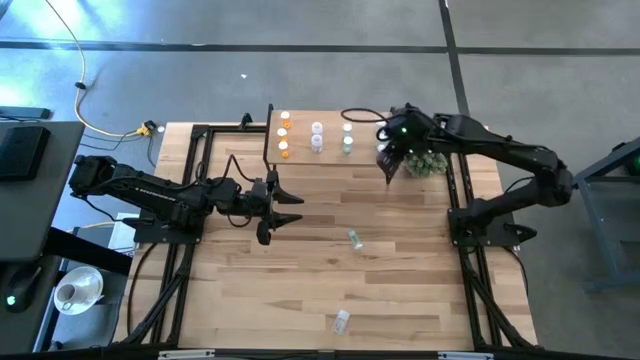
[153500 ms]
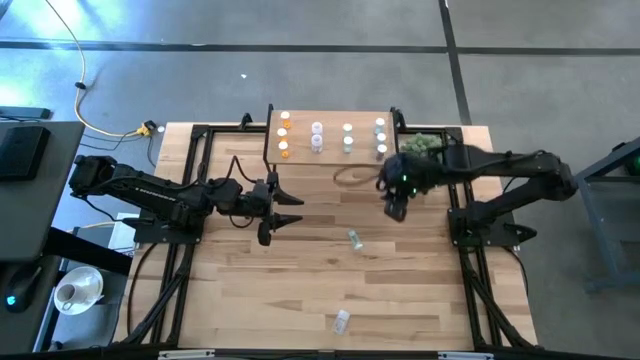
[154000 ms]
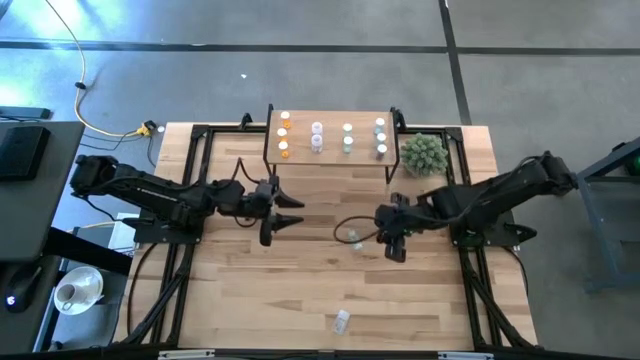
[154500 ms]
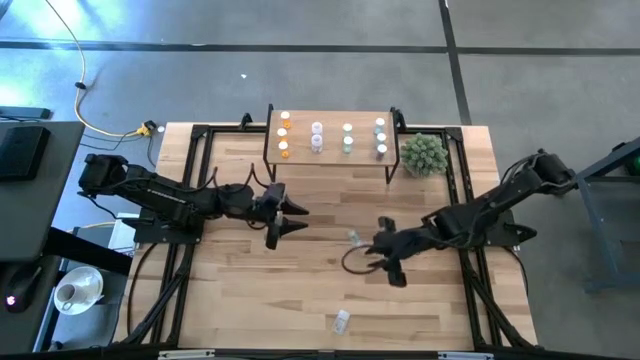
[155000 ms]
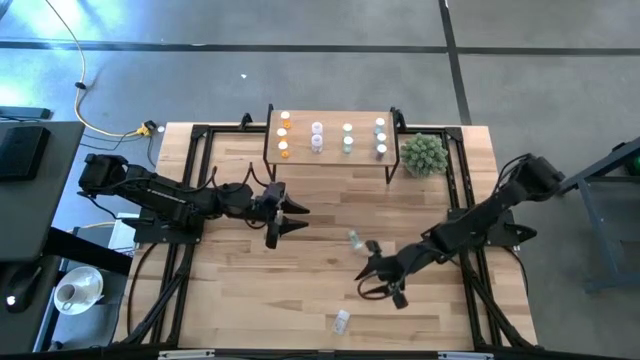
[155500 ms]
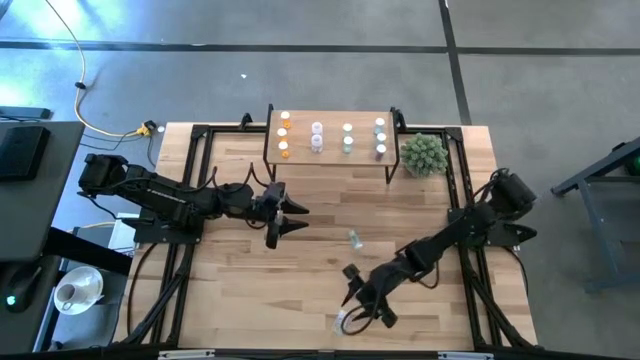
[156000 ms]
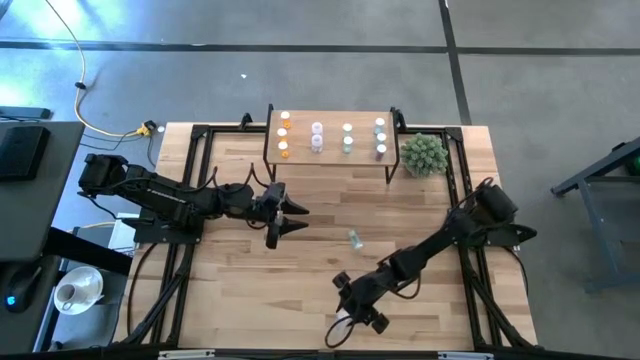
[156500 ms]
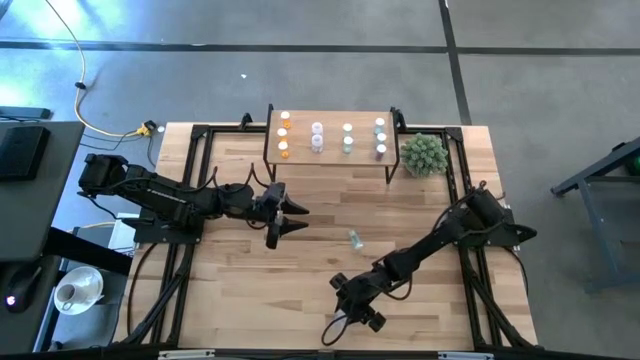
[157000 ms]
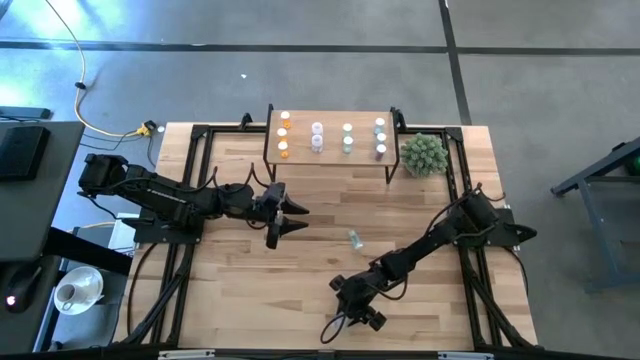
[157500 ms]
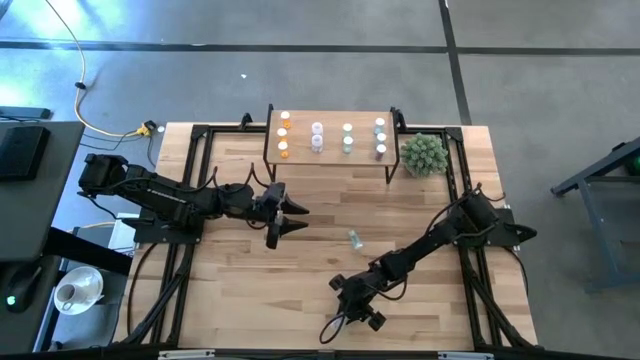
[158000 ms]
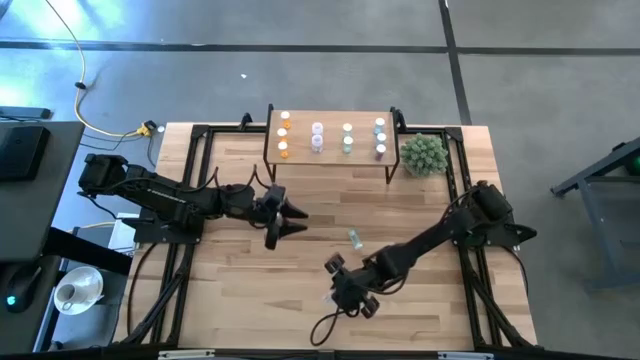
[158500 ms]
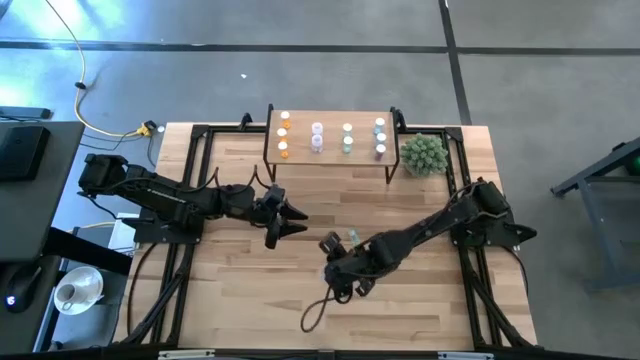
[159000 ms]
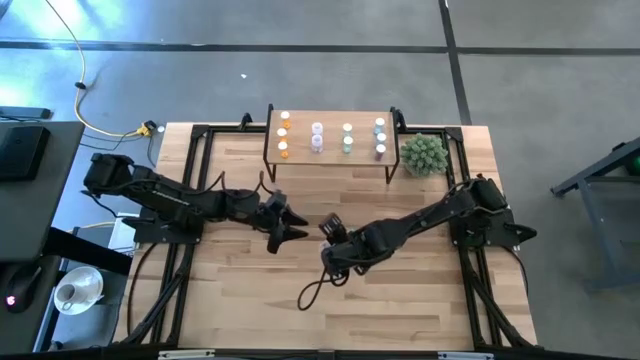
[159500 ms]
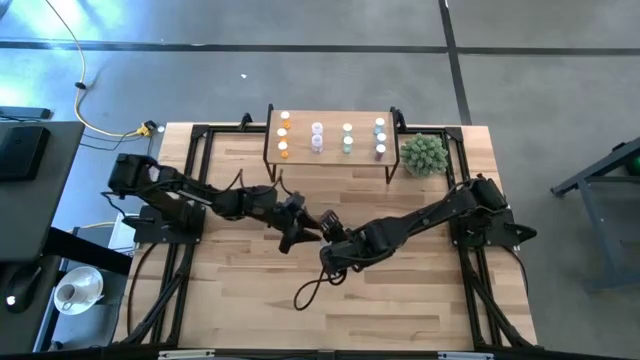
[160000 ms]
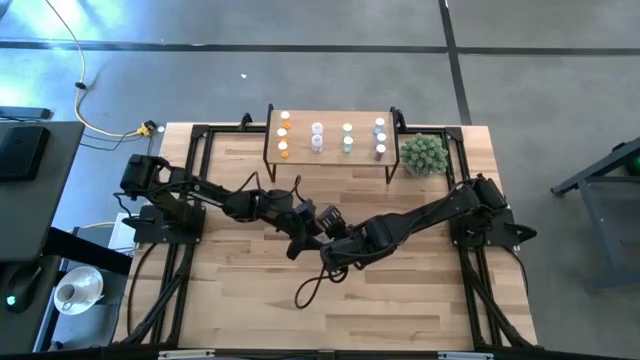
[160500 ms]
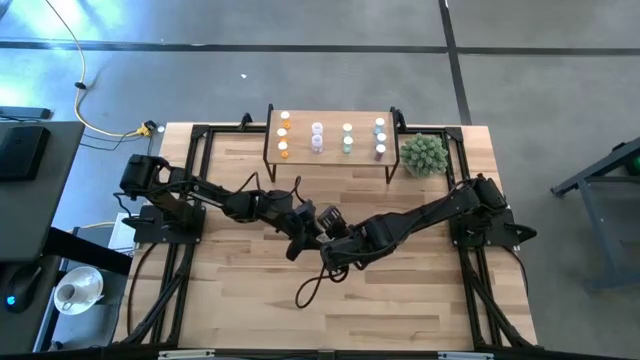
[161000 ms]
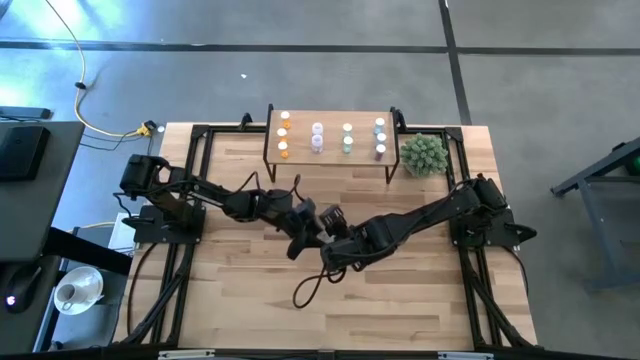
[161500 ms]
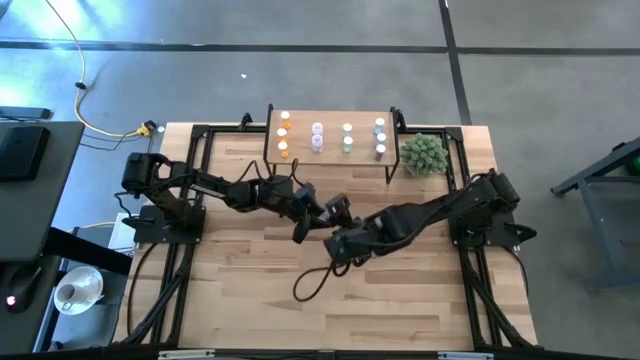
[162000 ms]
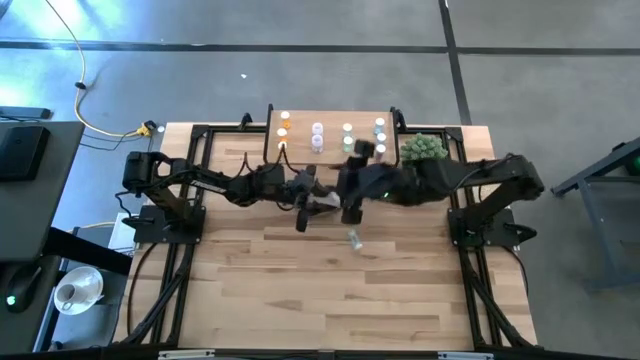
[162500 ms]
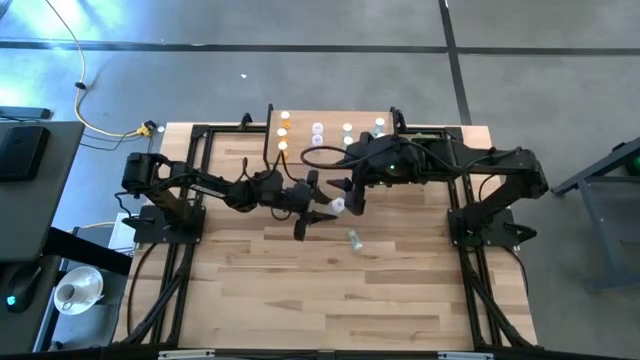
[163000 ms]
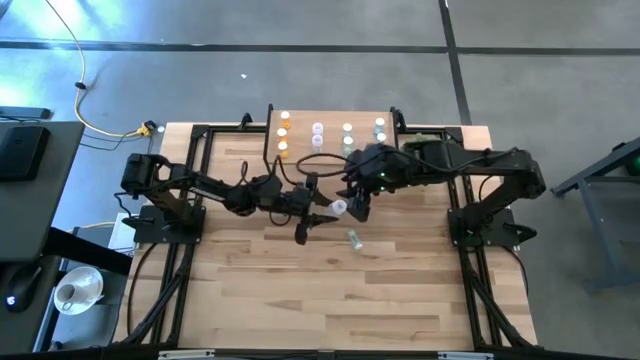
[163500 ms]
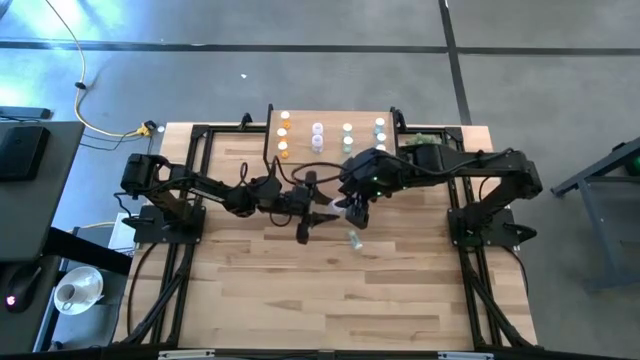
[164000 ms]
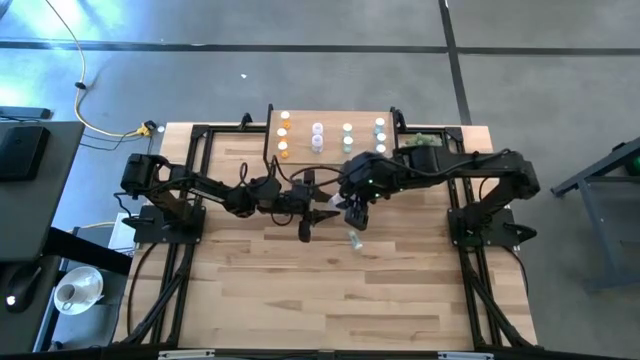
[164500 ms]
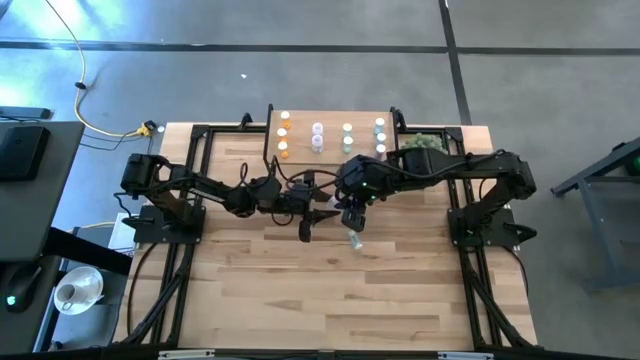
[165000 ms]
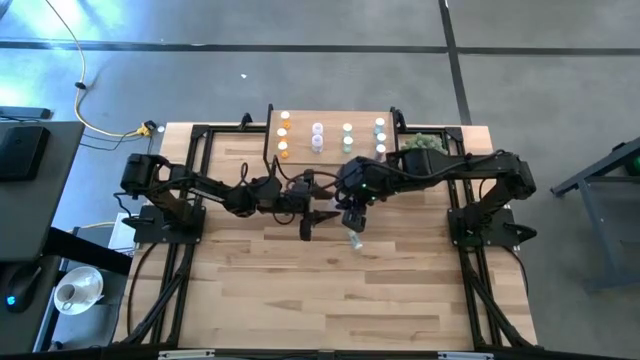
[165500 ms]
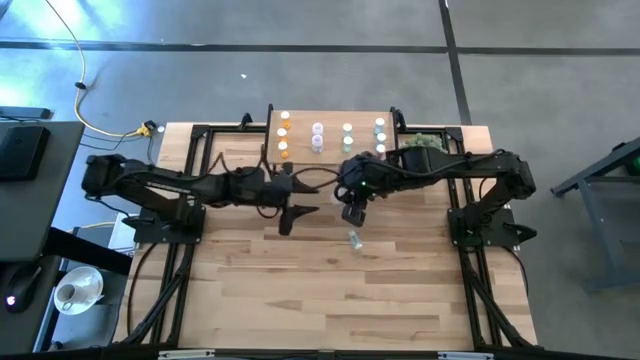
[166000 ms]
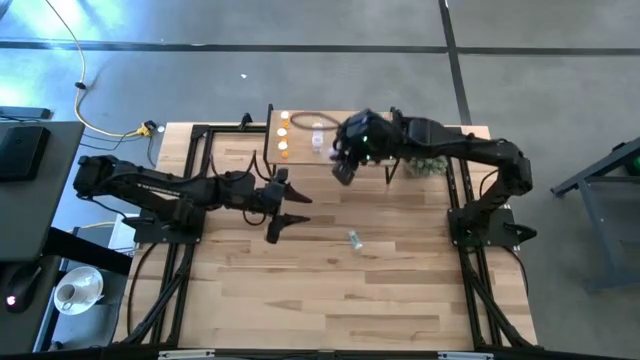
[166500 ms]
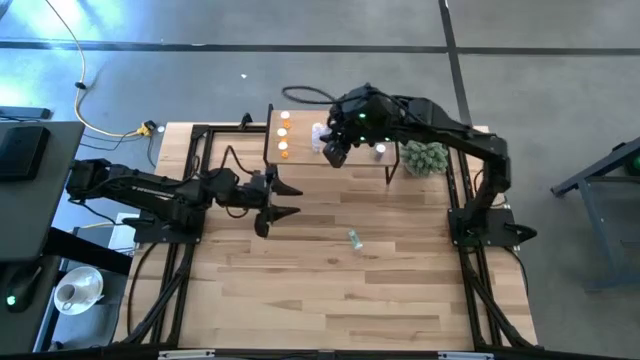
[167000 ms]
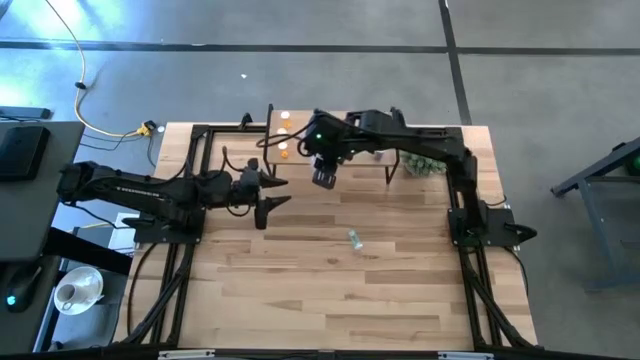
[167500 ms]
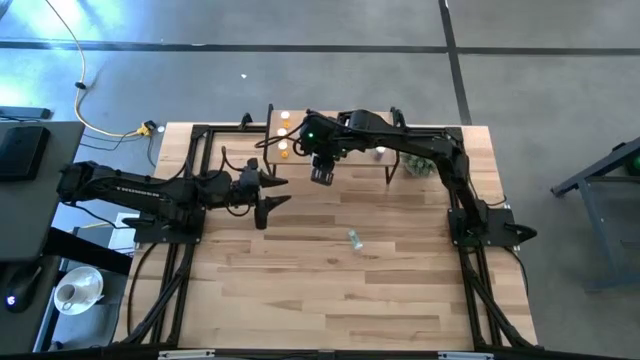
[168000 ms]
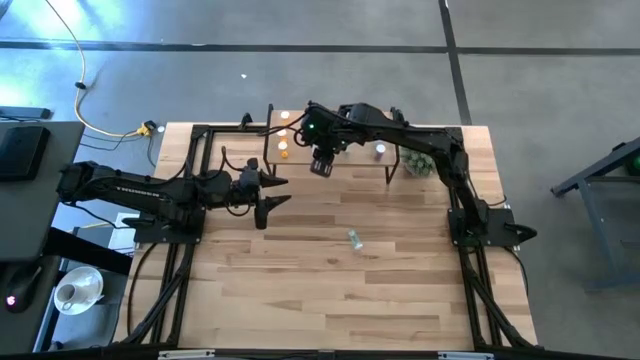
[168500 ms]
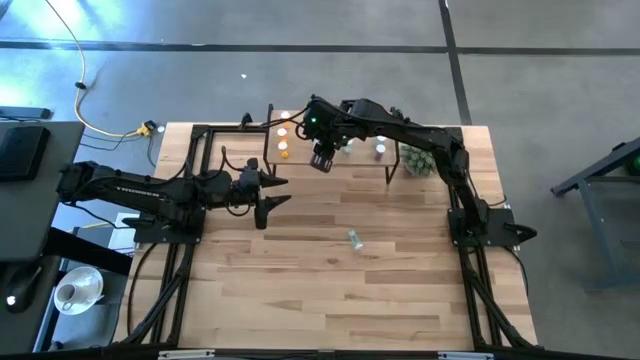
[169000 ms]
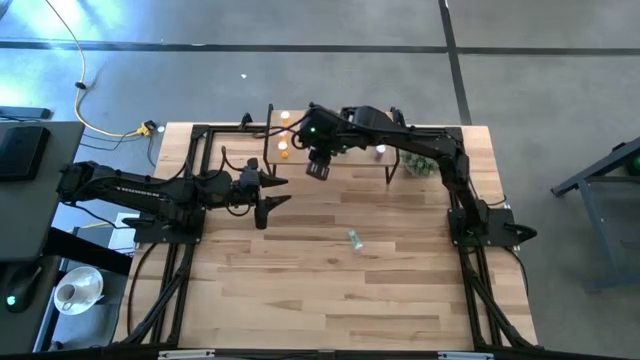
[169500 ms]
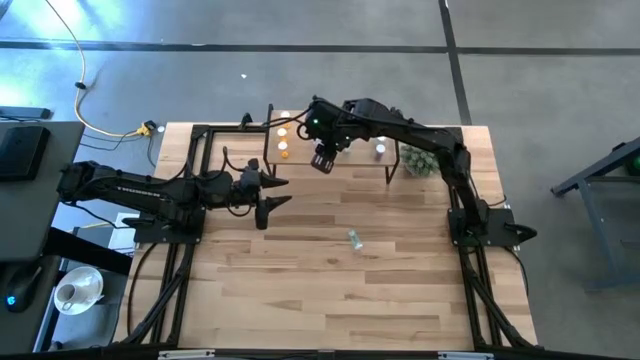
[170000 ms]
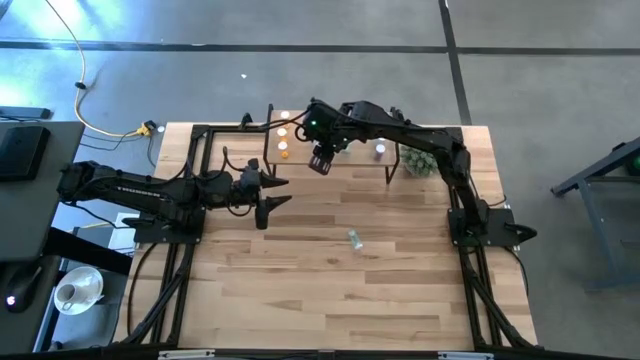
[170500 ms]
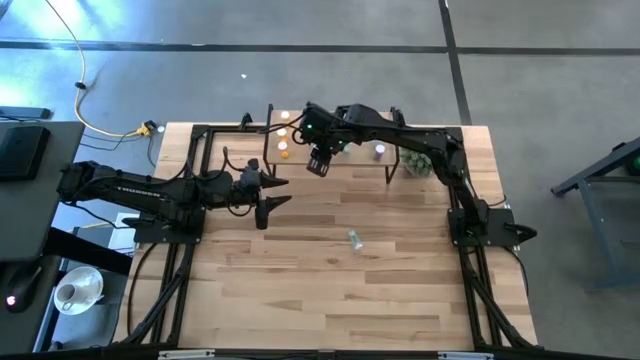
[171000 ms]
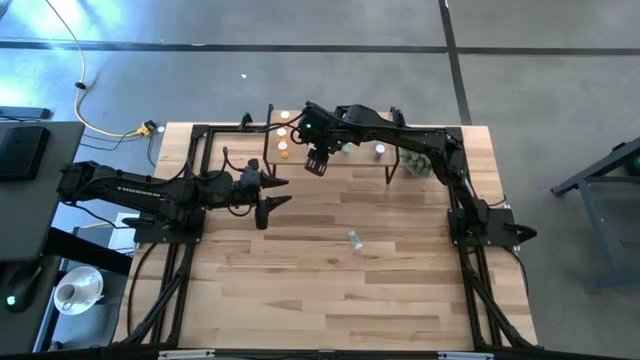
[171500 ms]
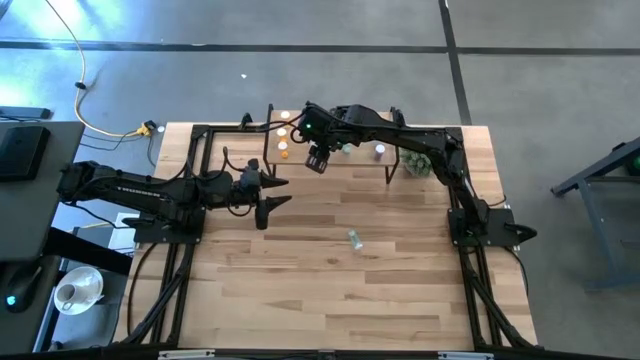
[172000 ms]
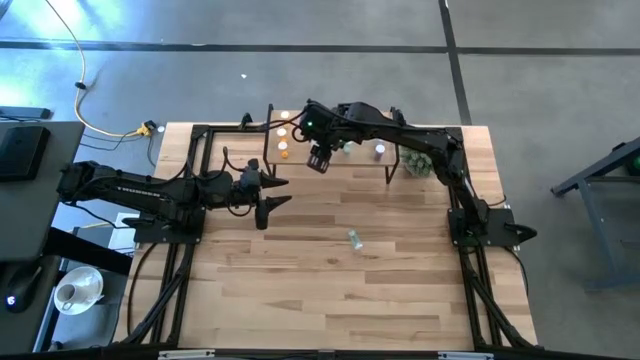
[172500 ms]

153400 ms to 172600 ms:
Task: Pick and place medicine bottles onto shelf by color
Put the transparent pill bottle on the shelf and aligned with the other transparent pill bottles

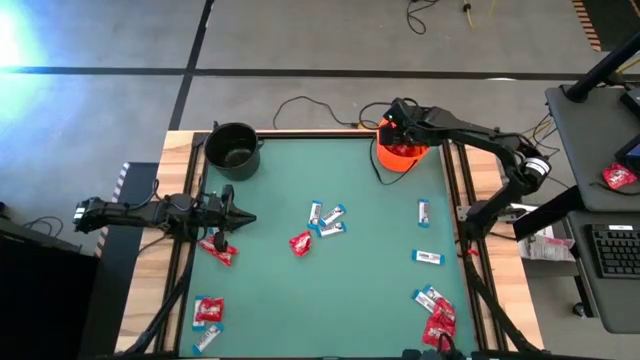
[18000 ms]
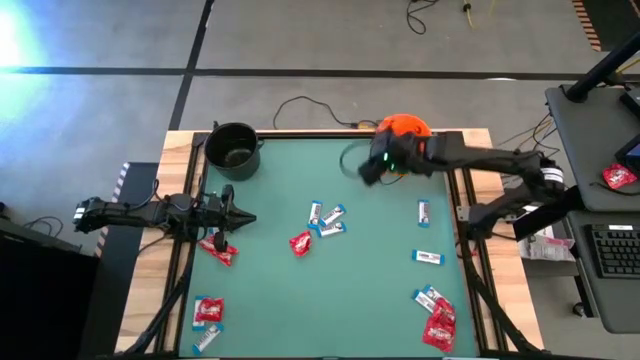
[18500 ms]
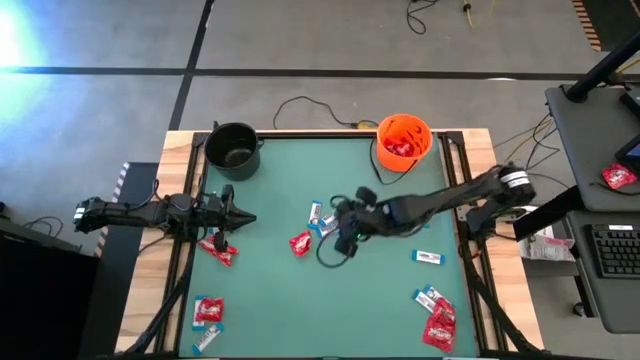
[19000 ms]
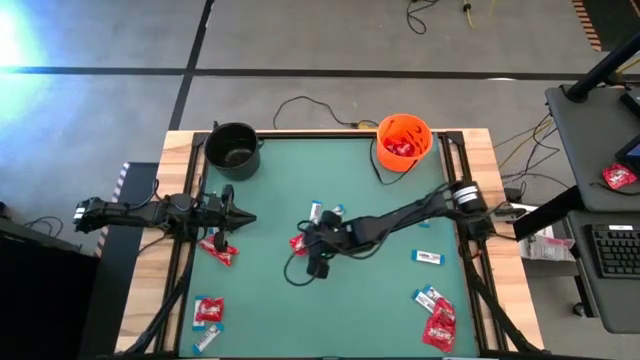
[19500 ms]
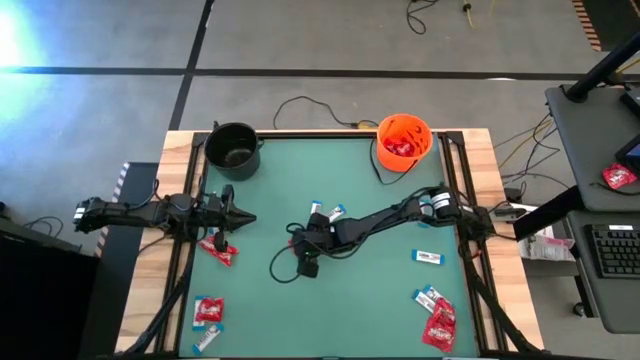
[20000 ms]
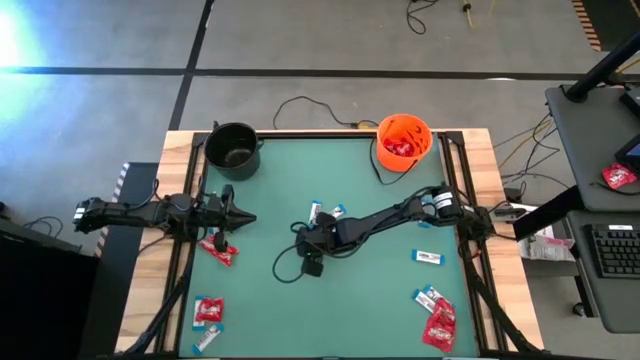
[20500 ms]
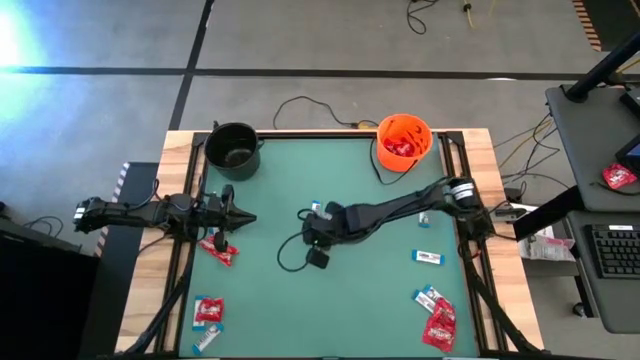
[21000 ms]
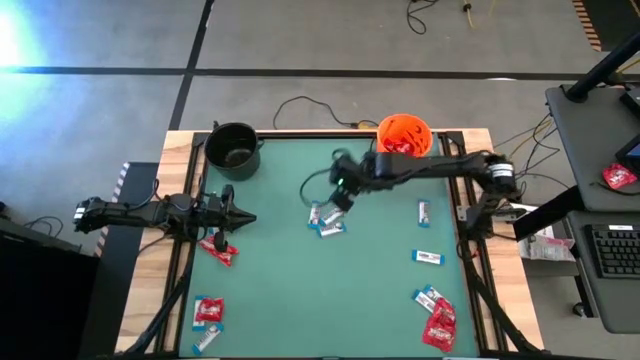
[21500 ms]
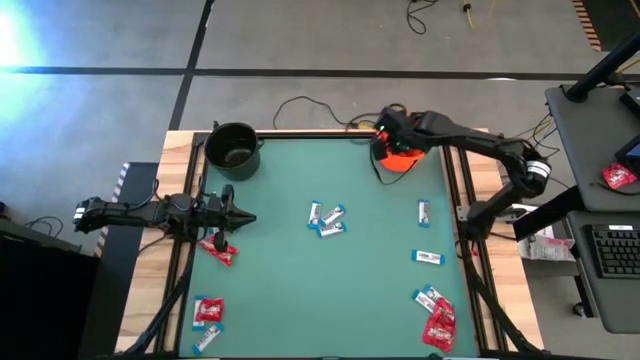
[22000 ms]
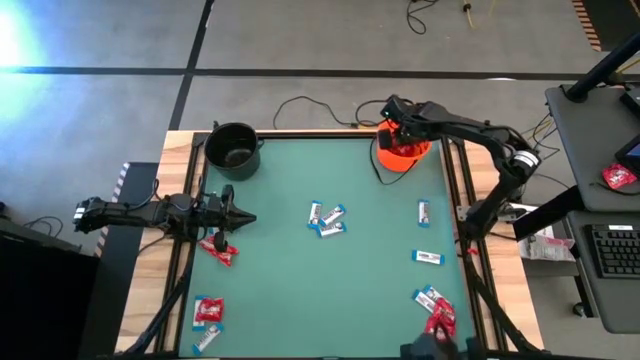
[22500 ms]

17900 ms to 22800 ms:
Task: Sort candy by brand, put in halloween buckets
Put the red candy into the orange bucket
